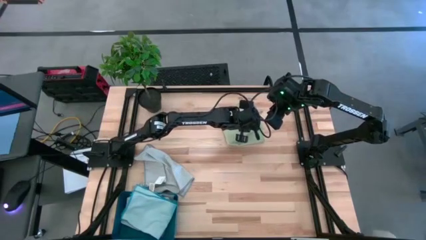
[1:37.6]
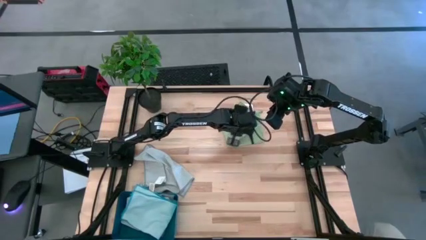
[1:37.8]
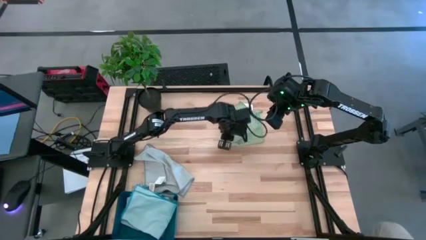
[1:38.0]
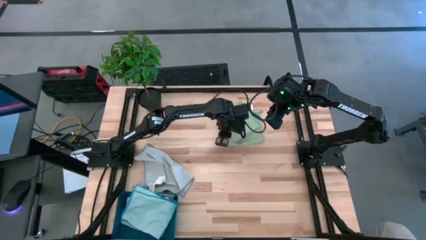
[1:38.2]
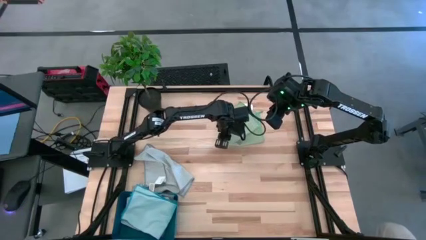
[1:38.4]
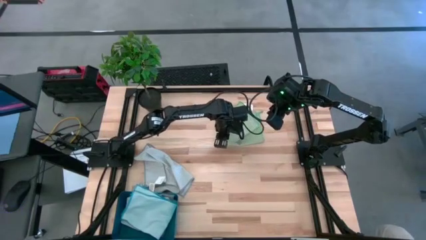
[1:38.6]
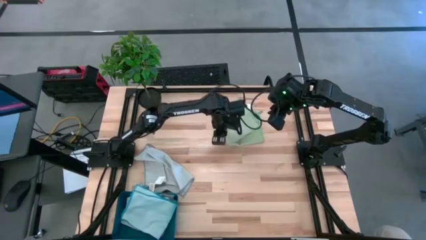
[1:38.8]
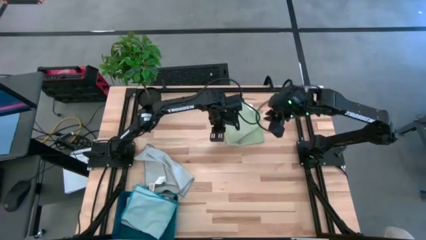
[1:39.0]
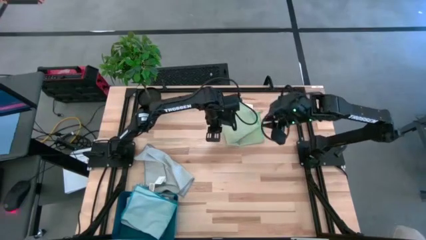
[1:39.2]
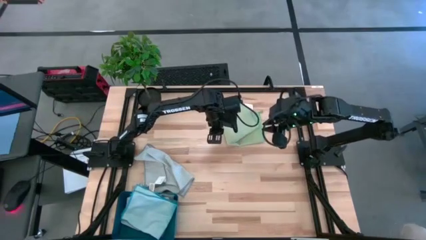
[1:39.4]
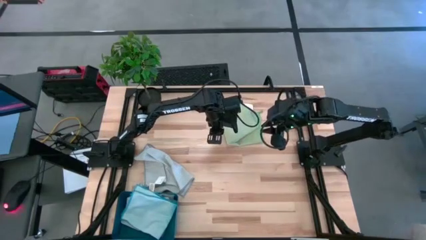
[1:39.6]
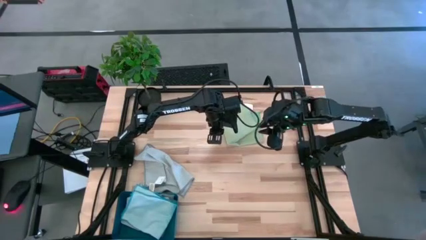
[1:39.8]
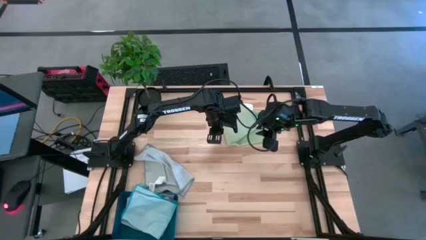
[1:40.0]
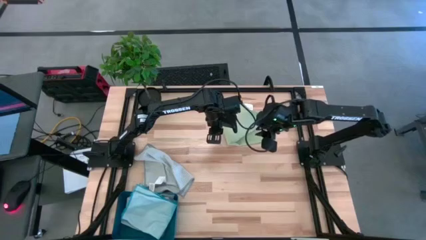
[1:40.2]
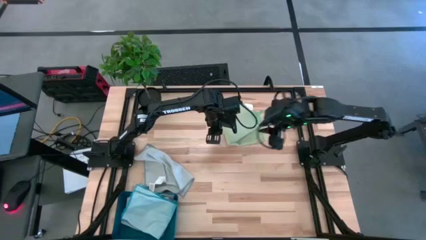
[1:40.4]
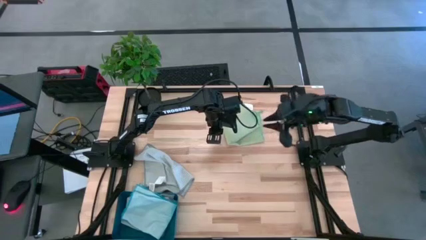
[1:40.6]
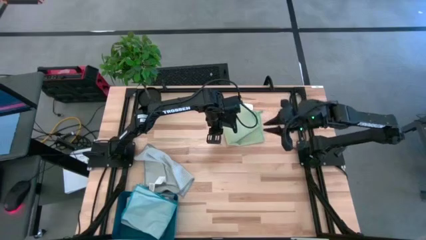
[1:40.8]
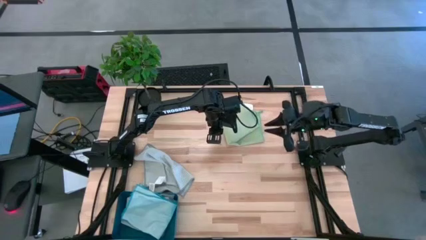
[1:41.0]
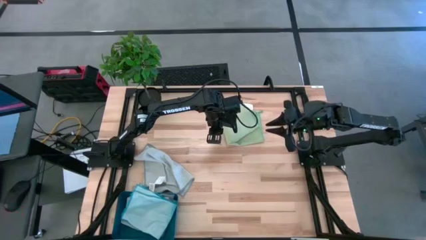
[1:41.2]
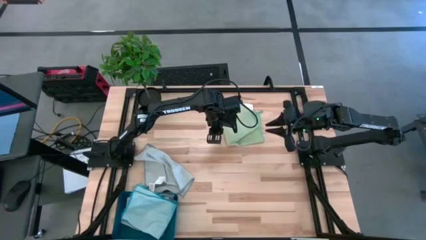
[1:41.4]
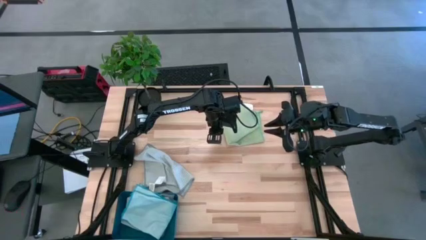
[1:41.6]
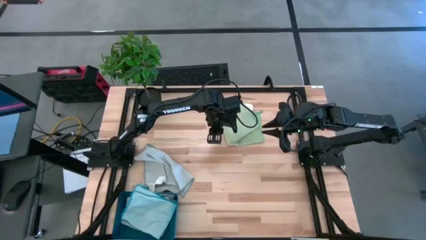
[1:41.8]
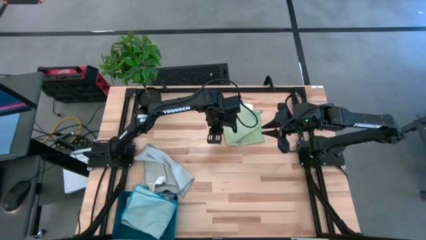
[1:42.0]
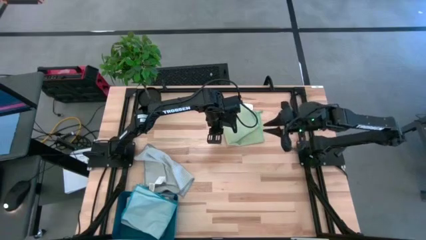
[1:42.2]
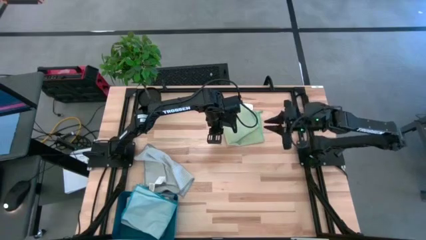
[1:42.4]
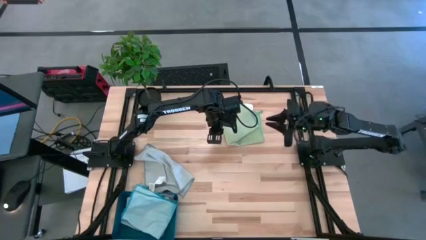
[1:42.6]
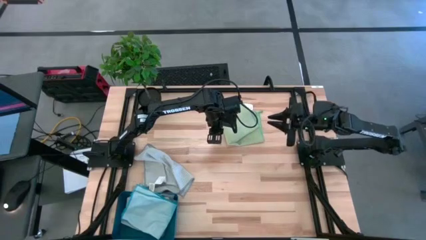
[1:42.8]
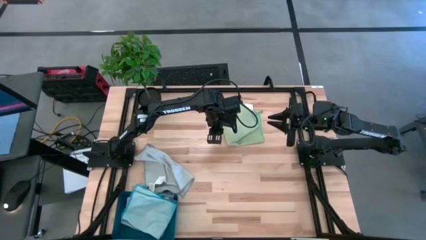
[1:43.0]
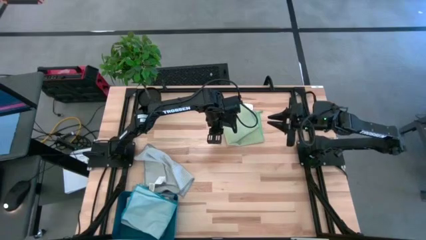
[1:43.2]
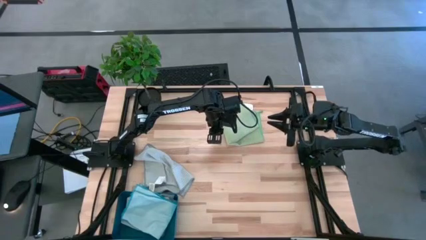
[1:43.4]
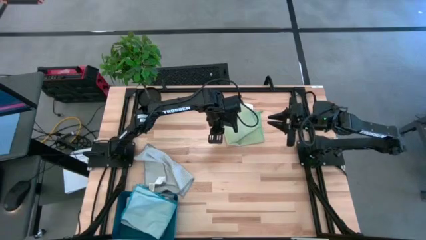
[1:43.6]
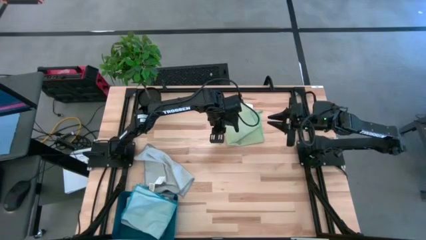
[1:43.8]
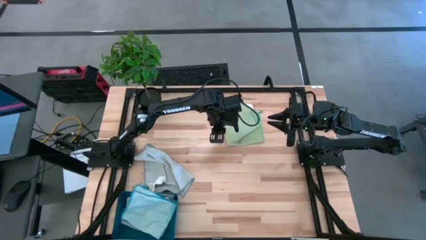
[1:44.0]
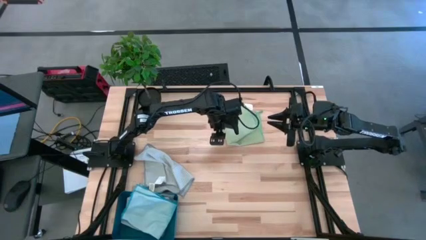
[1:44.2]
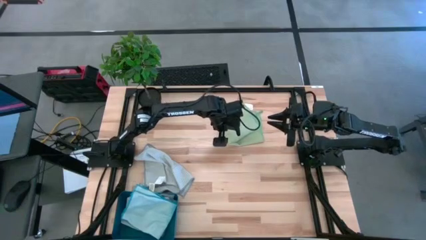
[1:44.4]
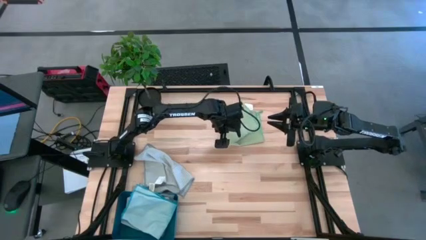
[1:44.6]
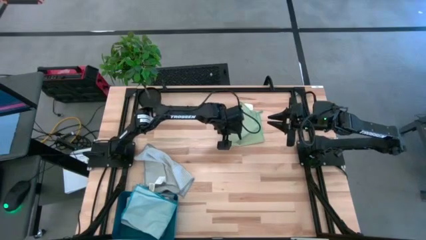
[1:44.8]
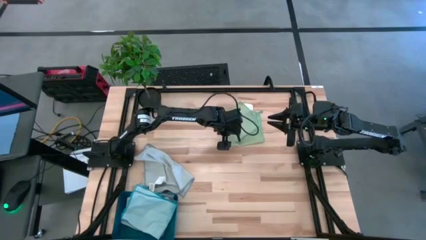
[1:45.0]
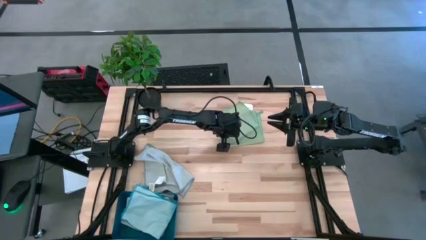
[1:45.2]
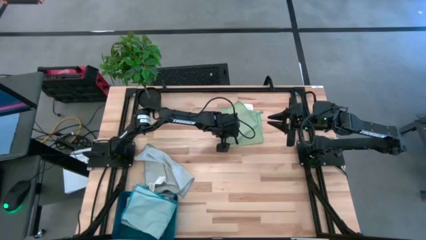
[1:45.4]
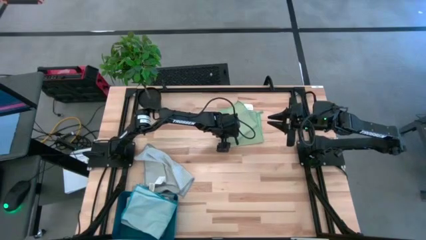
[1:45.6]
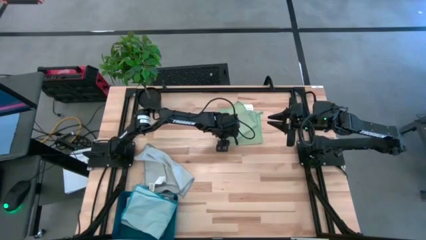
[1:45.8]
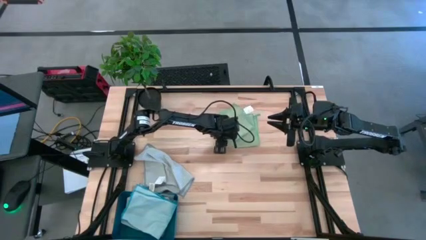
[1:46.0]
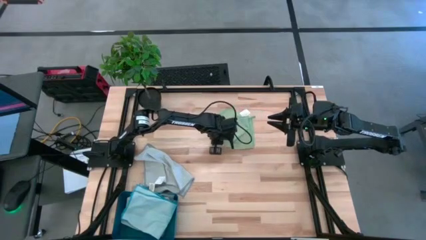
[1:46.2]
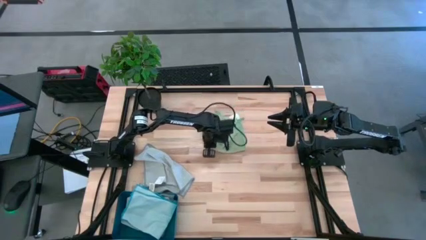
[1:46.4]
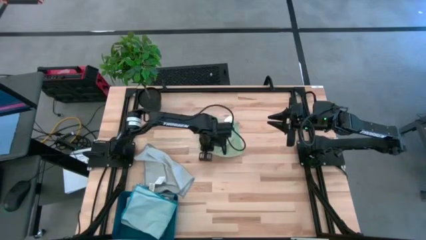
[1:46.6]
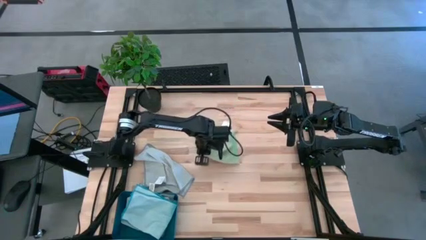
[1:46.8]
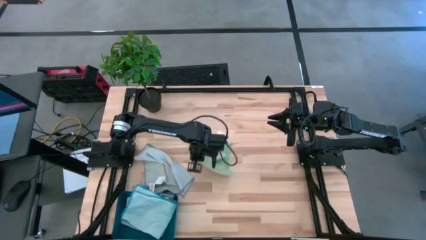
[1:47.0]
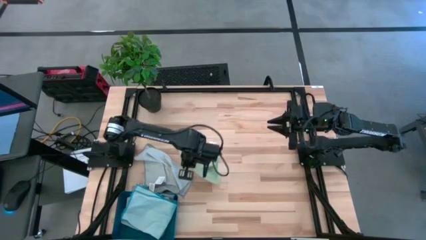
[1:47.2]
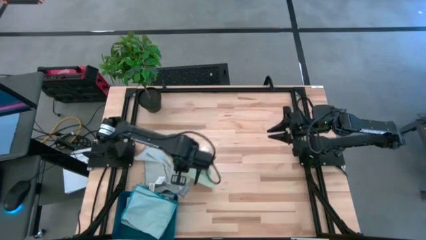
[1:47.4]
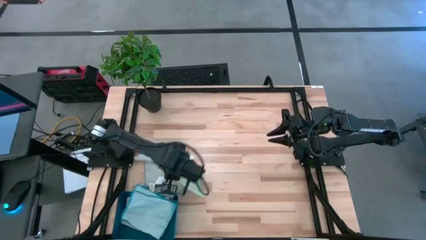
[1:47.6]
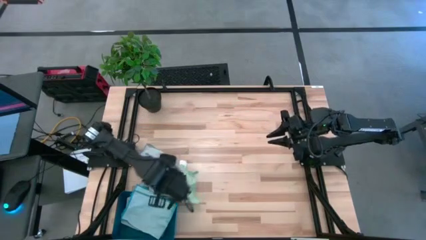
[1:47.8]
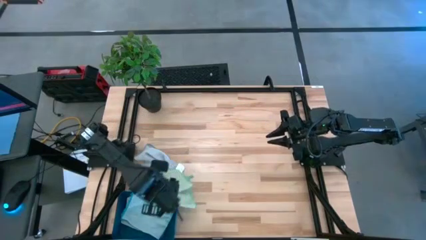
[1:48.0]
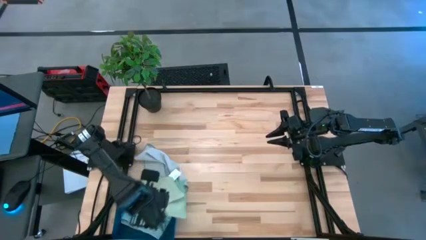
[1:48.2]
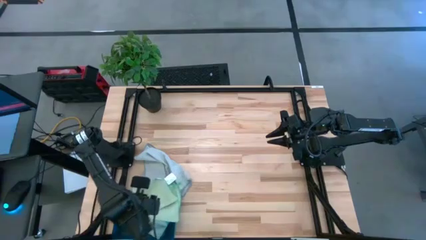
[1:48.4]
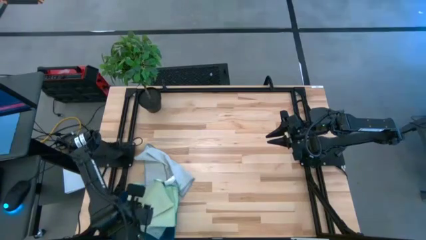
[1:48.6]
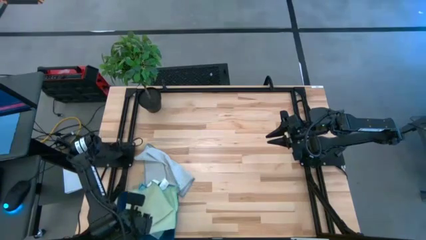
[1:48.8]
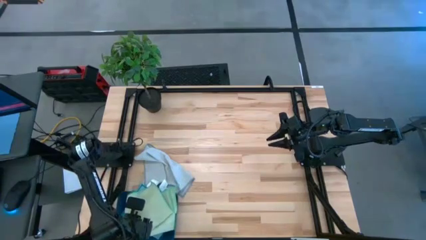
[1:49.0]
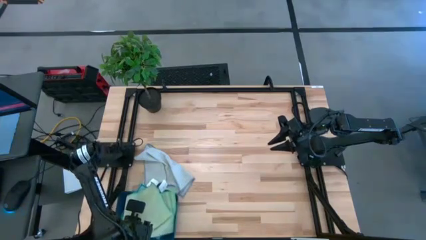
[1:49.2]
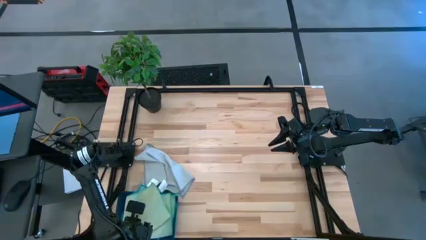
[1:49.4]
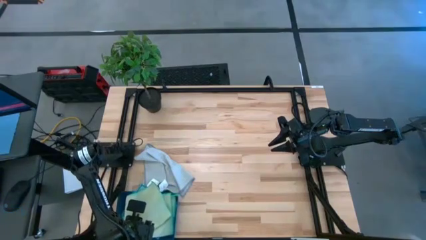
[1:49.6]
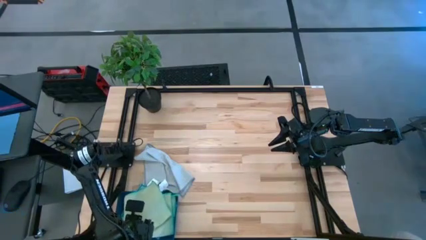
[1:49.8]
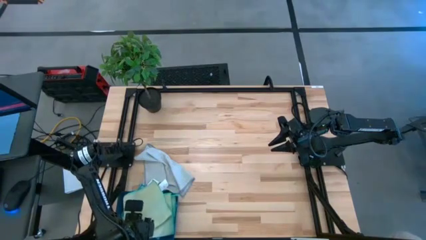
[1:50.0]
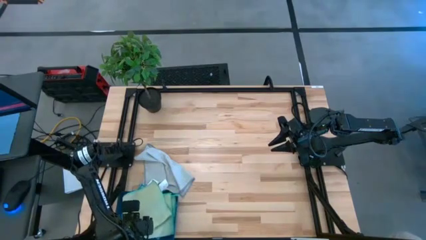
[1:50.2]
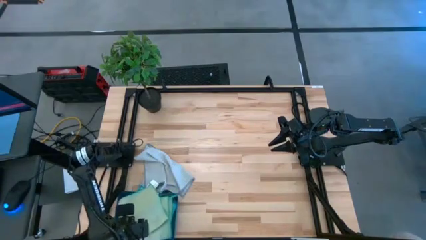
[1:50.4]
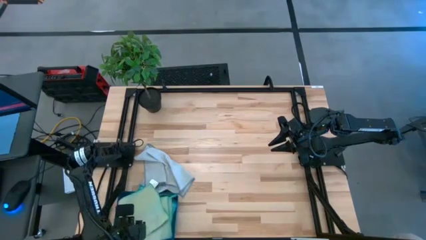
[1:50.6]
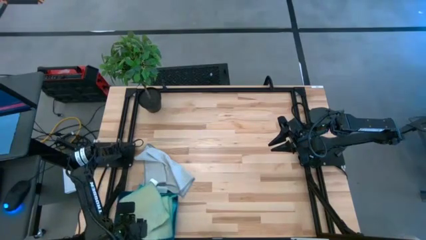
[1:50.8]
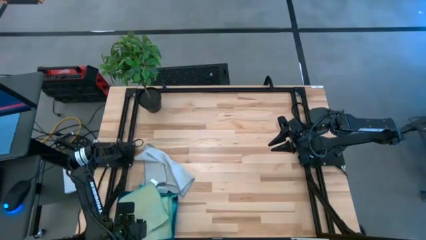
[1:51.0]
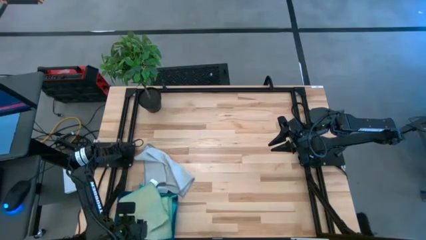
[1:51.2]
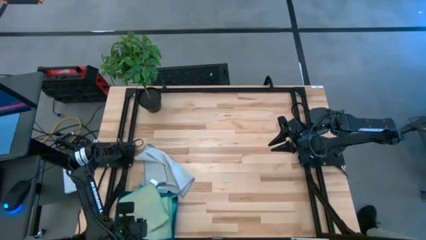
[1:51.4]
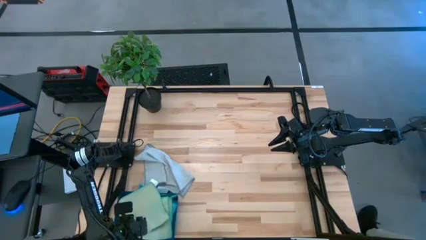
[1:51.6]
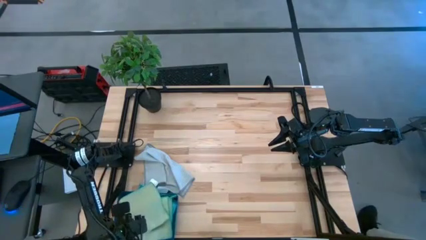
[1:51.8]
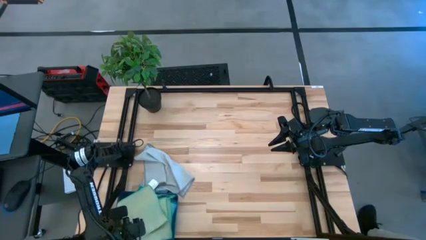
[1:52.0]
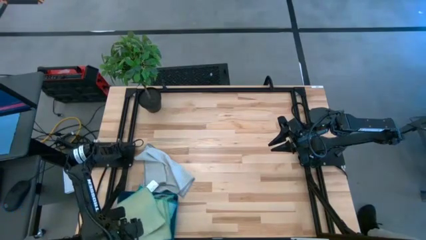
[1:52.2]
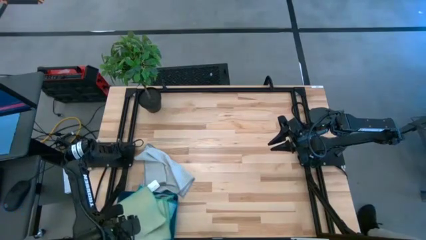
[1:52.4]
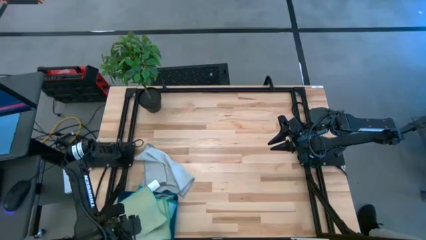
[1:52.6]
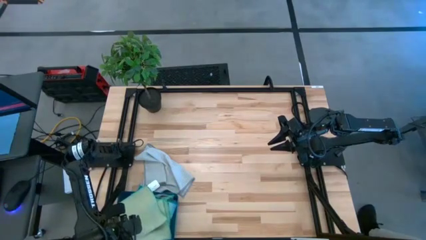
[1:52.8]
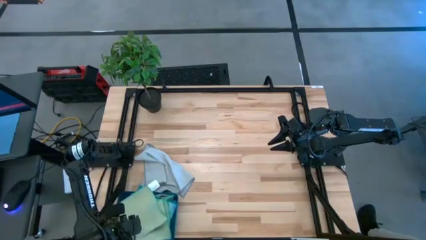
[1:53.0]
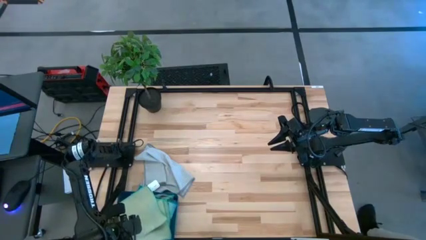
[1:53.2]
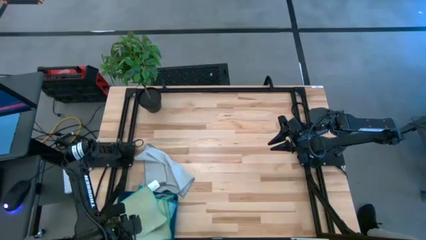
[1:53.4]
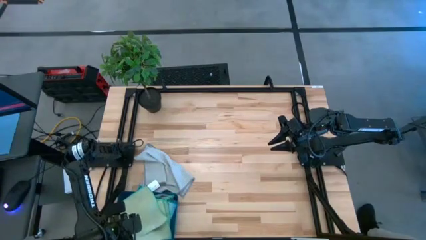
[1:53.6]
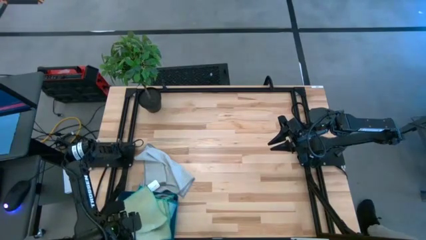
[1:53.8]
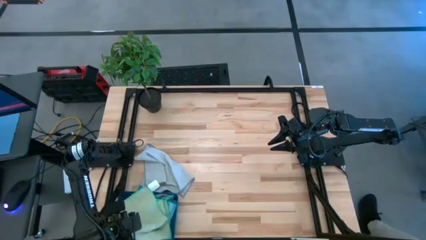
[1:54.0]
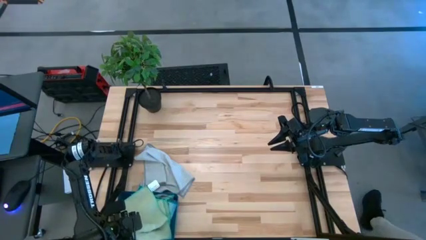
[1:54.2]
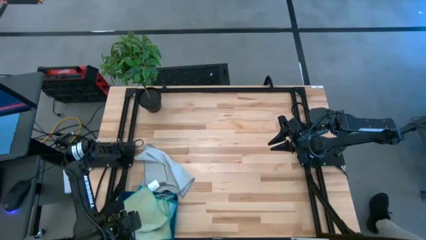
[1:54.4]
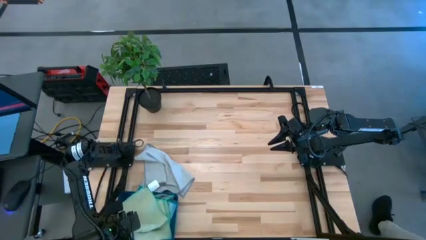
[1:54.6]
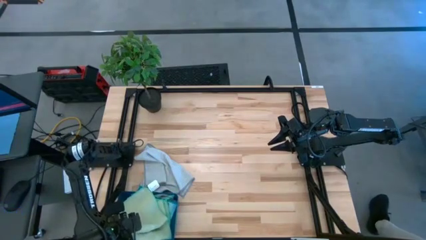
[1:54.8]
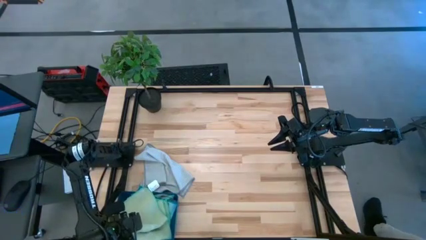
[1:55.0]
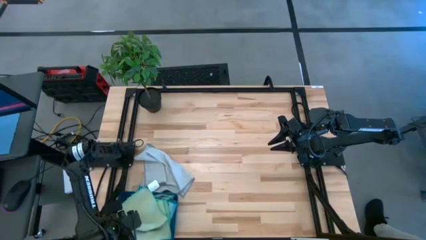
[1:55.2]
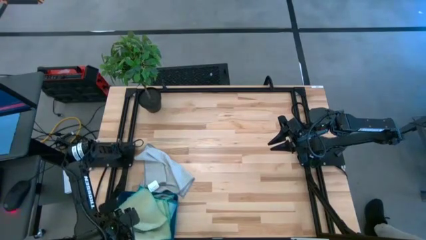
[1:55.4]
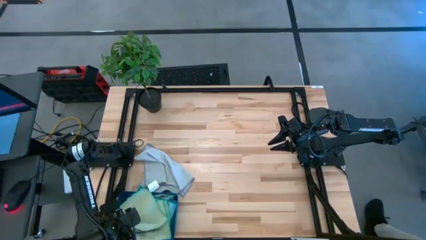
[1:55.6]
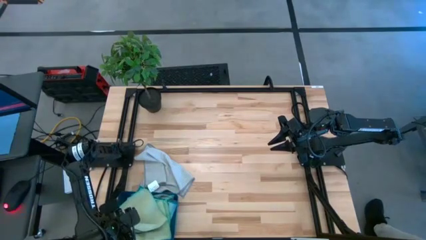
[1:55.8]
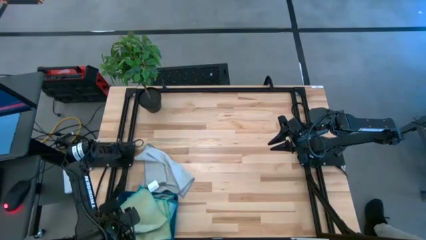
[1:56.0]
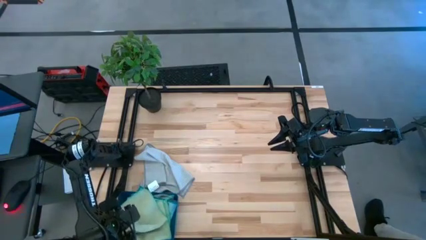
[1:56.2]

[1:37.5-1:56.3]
Task: Fold microfiber towels
Put the green microfiber towel into the blue bin
